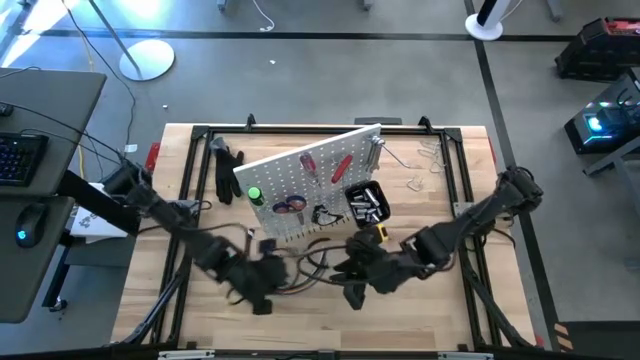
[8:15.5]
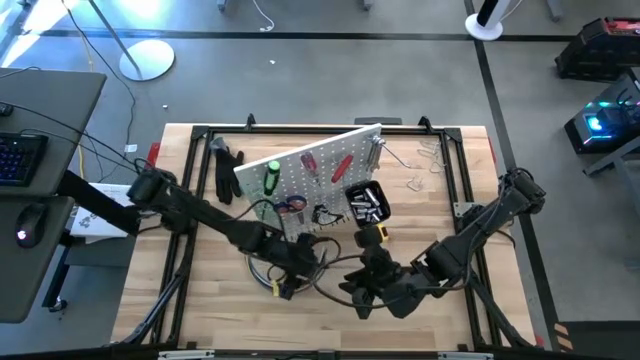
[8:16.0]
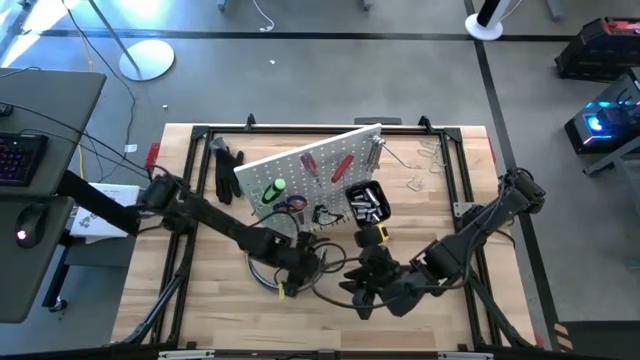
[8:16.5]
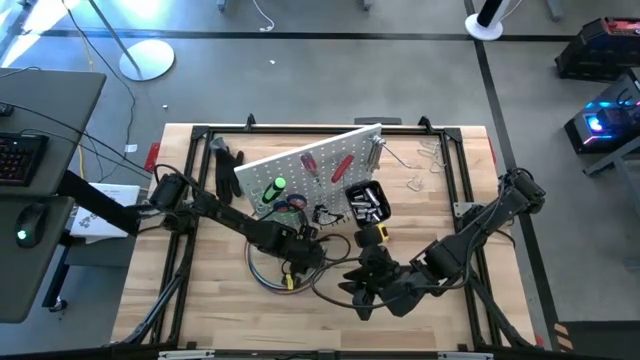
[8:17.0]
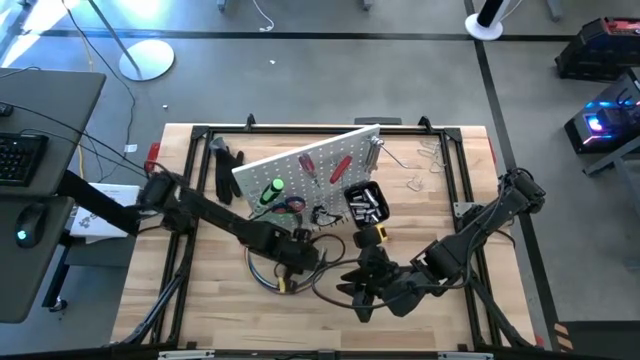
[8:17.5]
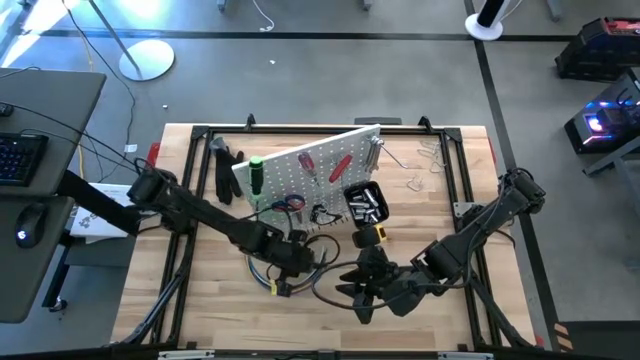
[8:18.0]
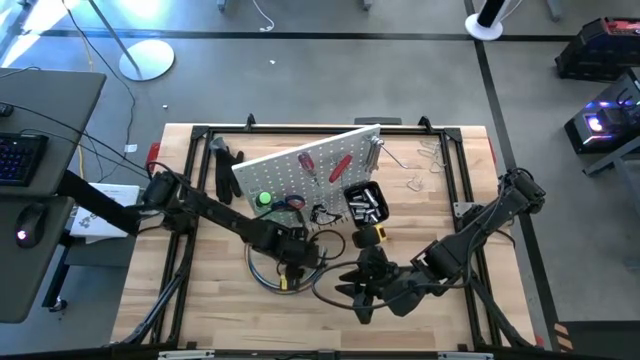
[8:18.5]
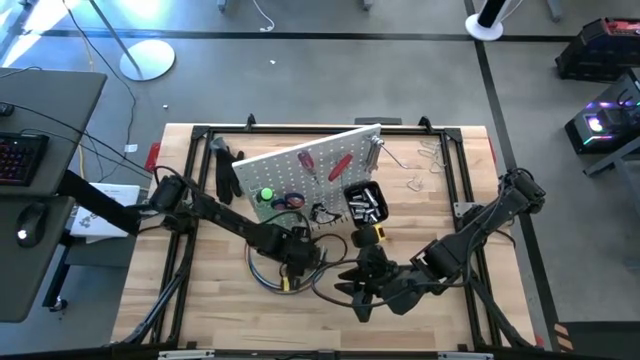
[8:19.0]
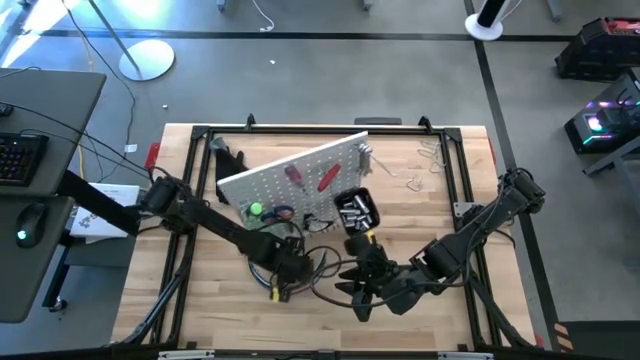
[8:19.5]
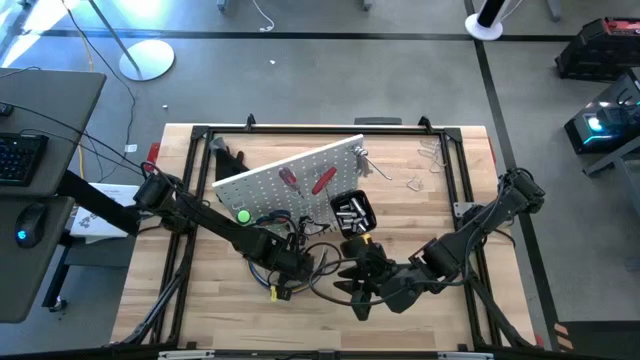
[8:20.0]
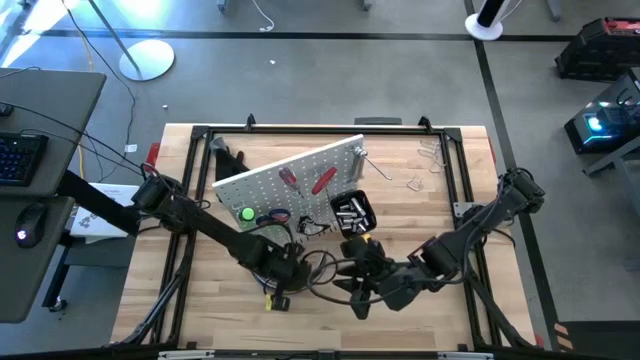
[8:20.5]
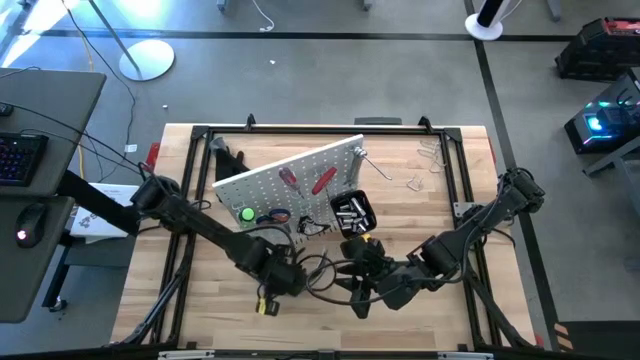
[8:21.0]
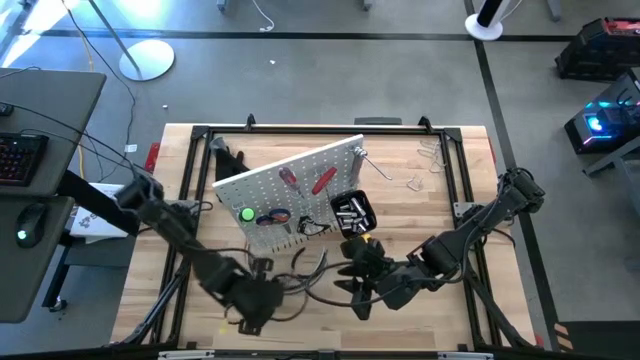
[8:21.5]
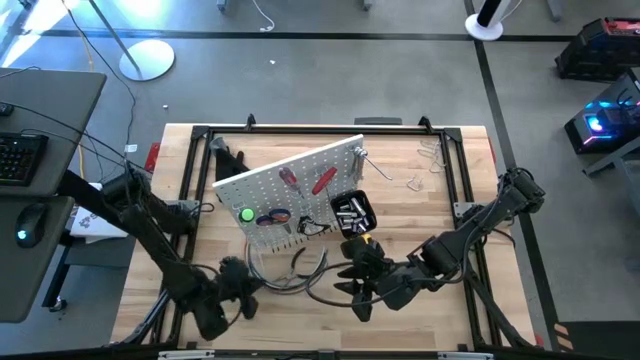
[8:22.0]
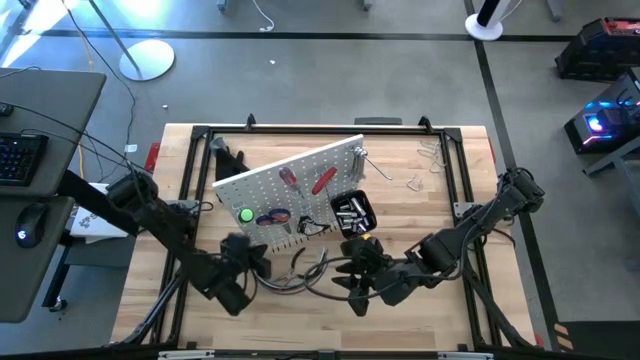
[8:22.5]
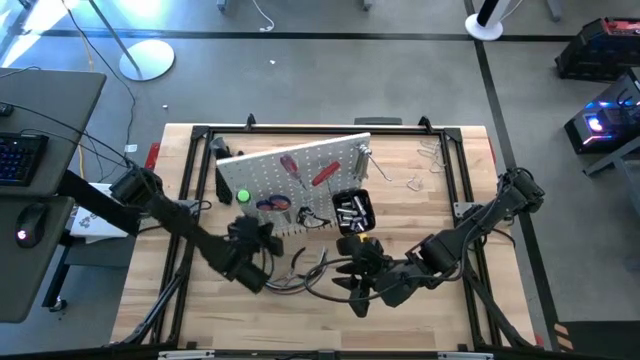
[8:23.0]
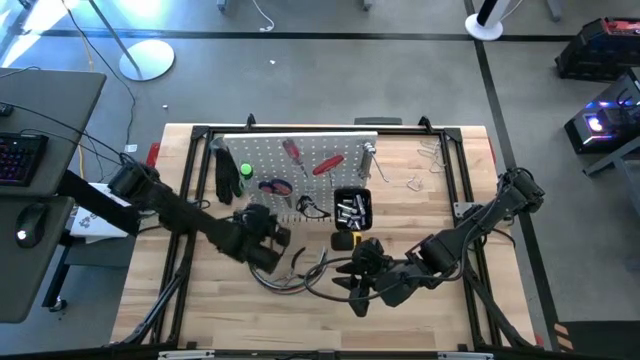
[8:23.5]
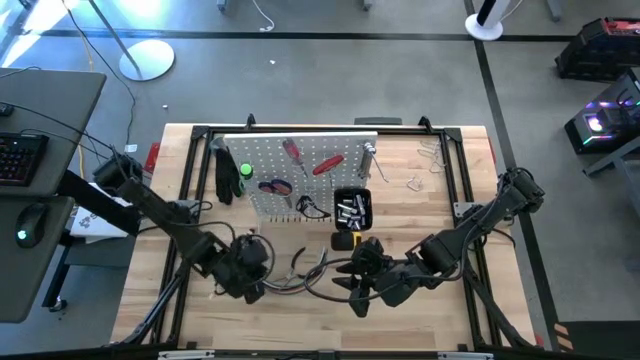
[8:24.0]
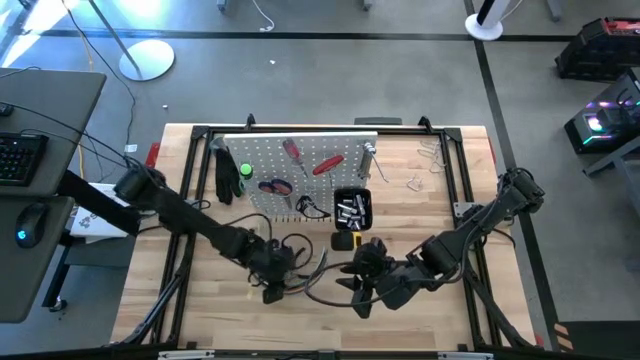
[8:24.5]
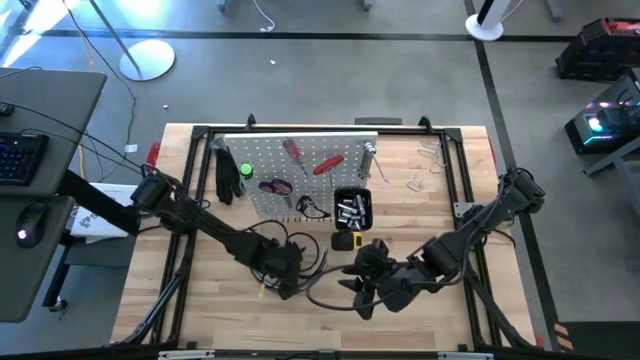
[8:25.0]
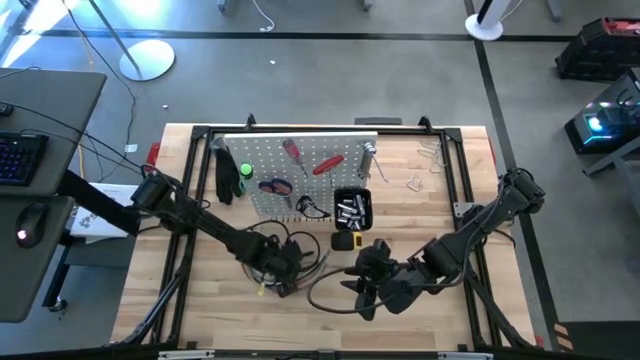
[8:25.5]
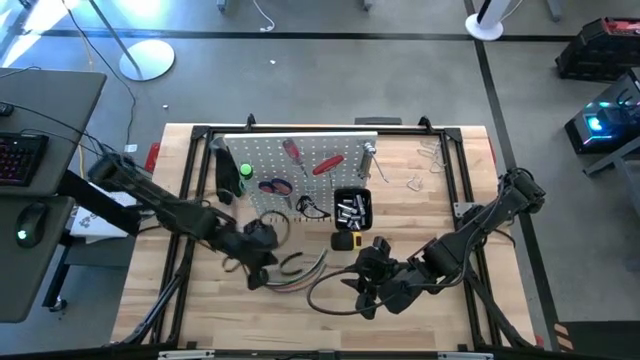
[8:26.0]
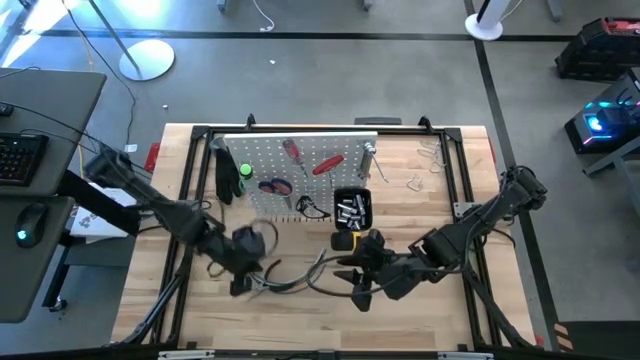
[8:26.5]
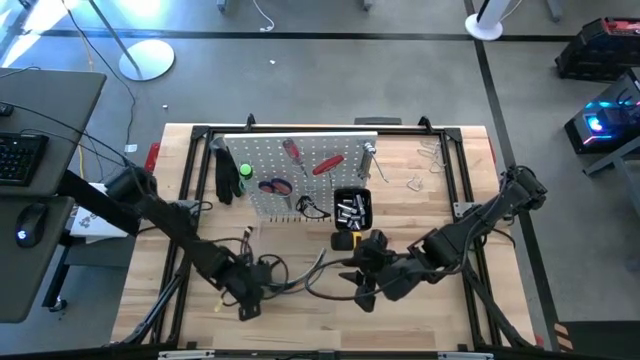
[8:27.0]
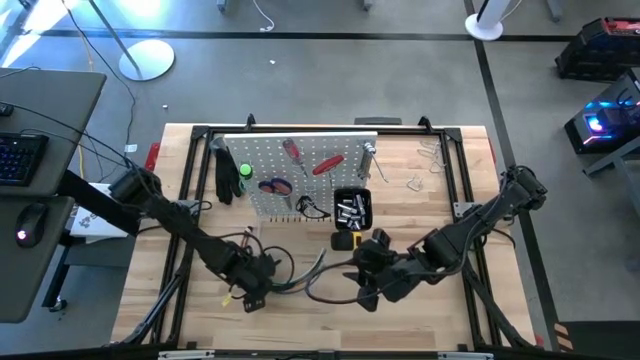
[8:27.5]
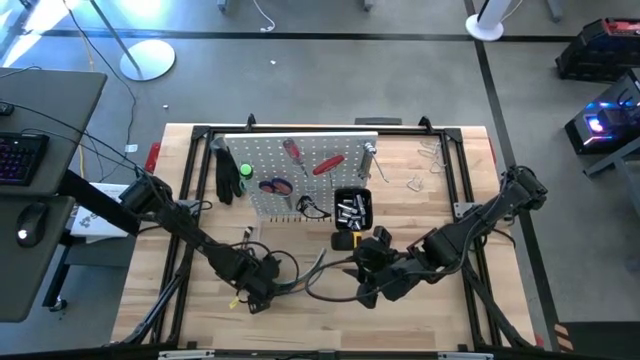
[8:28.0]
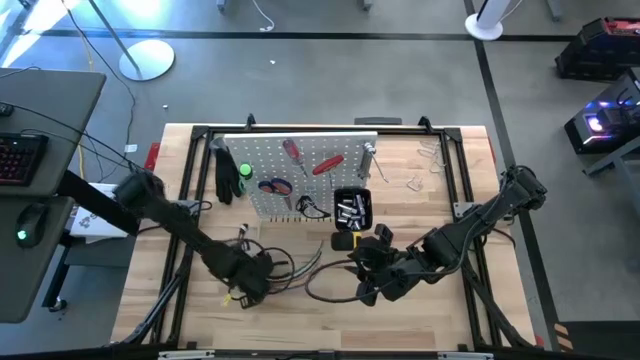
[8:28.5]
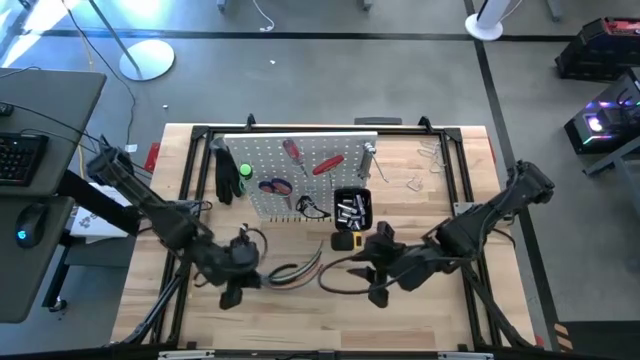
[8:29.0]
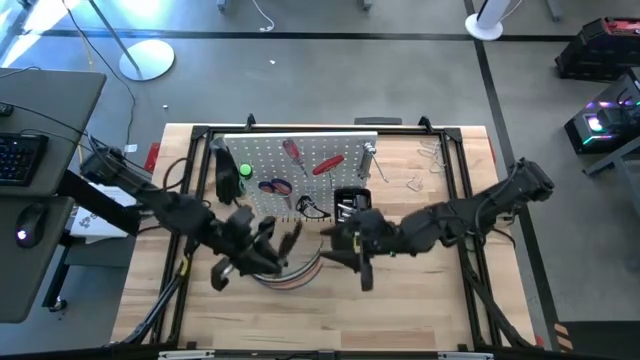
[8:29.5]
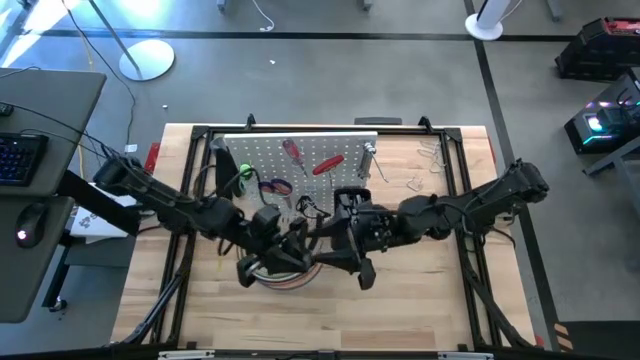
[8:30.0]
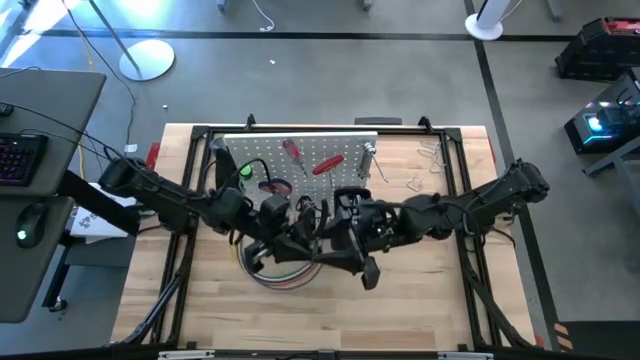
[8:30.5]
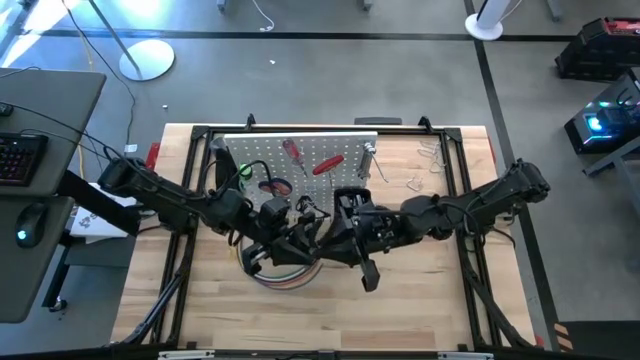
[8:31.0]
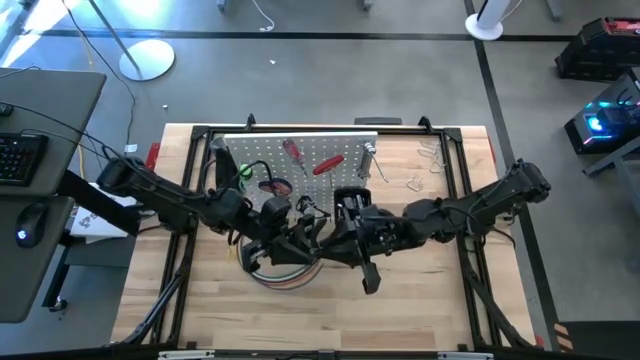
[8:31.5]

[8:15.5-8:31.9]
Task: Hang tools onto peg board
Hang the plier on the peg board

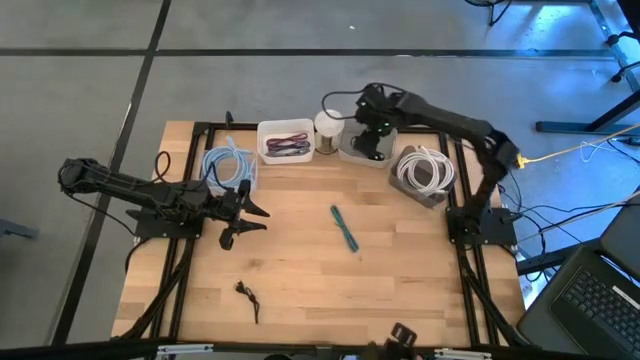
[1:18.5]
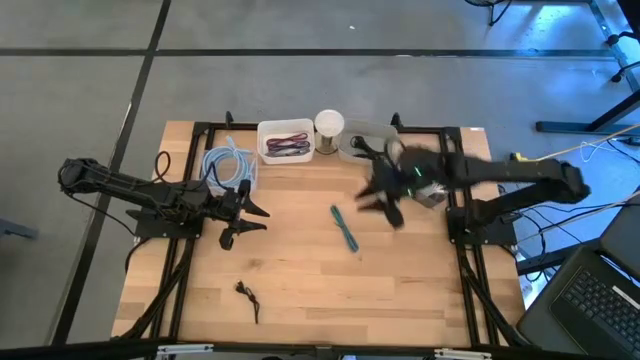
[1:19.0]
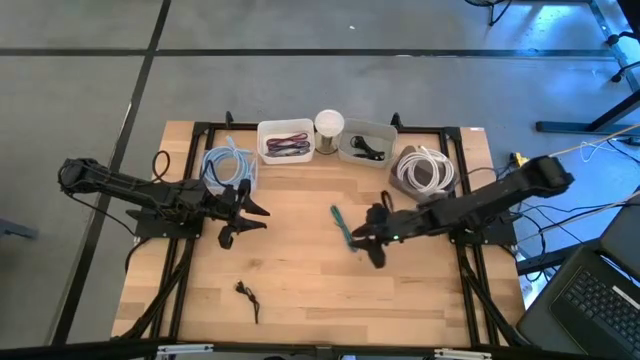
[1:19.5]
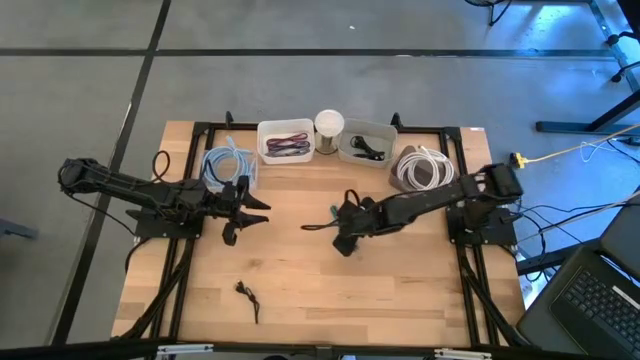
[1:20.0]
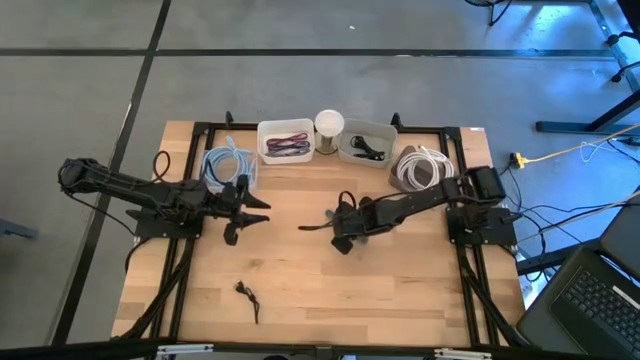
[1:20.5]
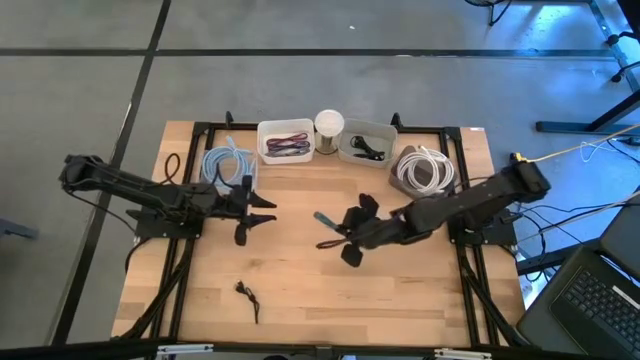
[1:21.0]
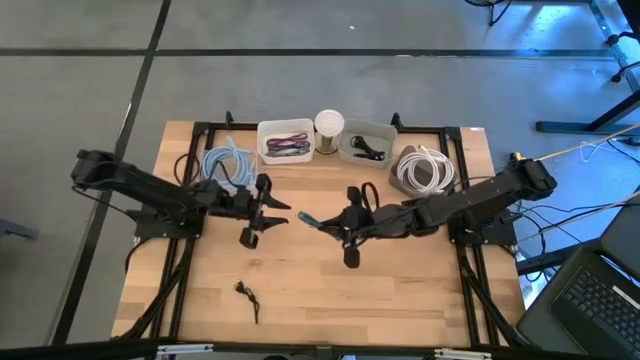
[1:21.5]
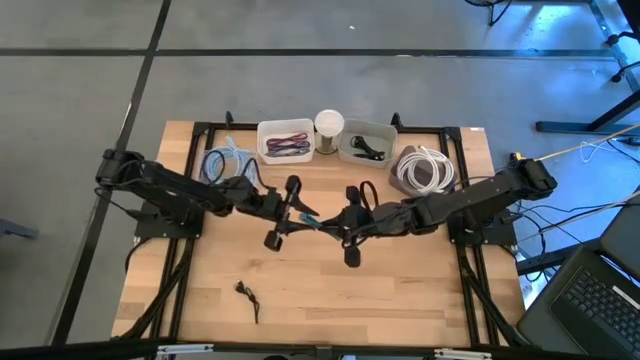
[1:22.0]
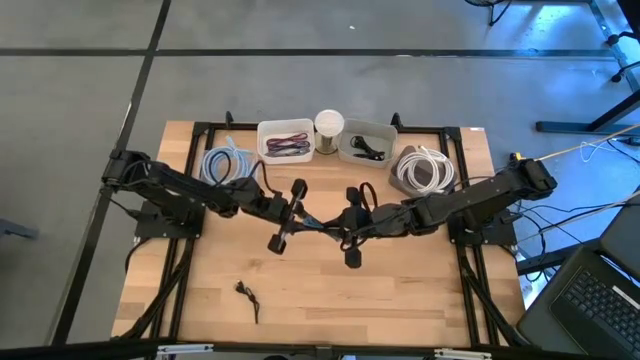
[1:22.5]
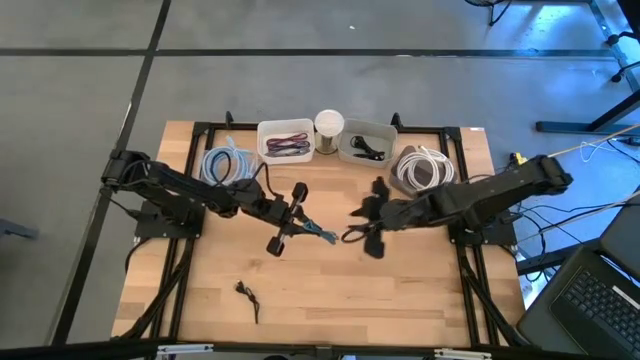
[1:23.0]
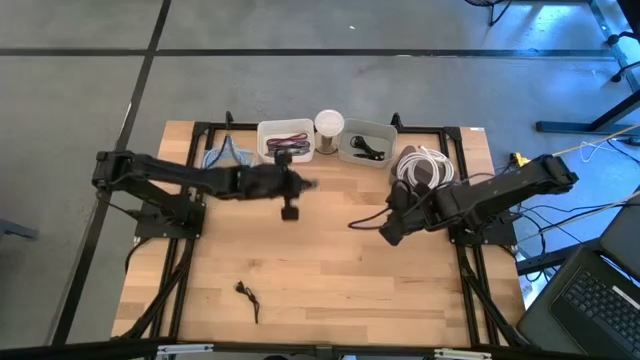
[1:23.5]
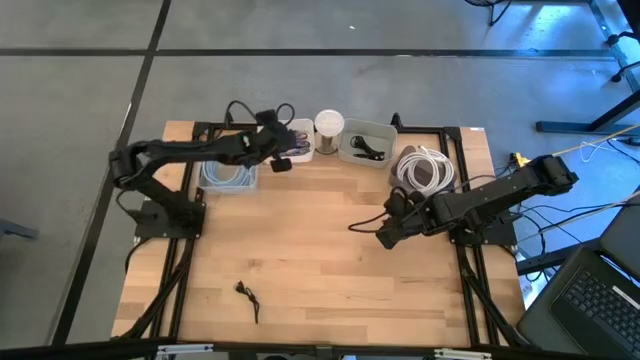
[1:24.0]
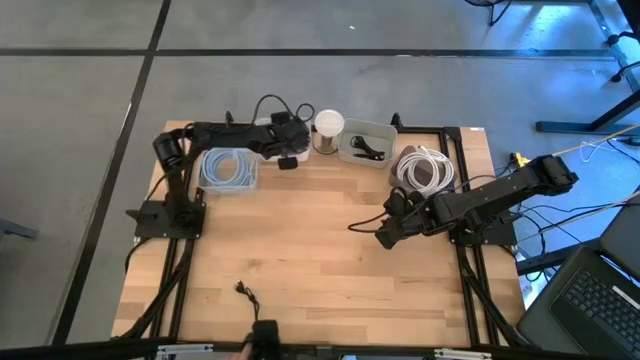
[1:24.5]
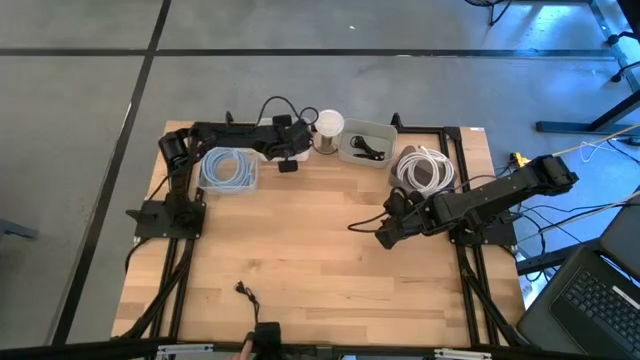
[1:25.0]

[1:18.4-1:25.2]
Task: Pick & Place USB Port
Put the blue USB cable into the white bin
